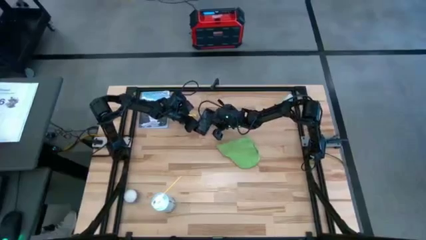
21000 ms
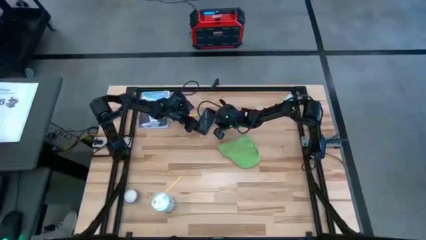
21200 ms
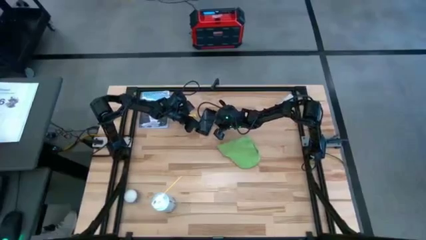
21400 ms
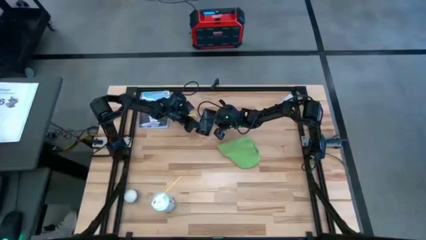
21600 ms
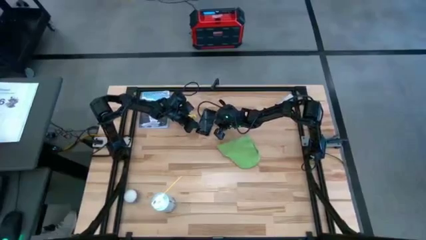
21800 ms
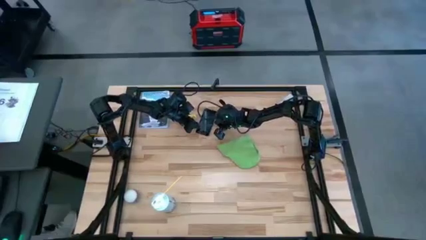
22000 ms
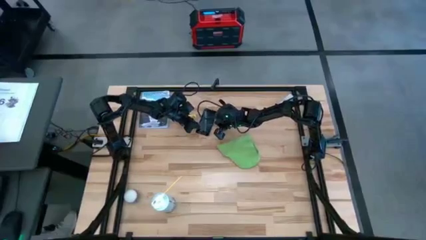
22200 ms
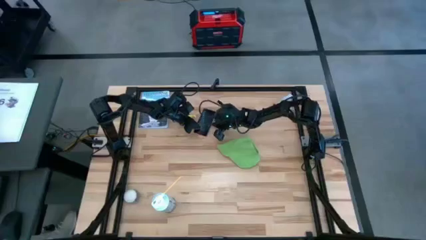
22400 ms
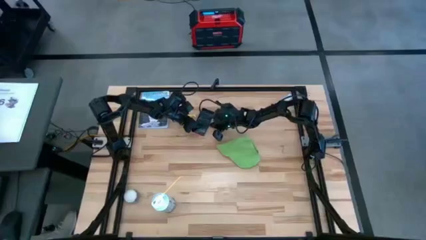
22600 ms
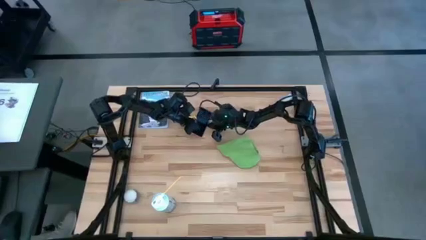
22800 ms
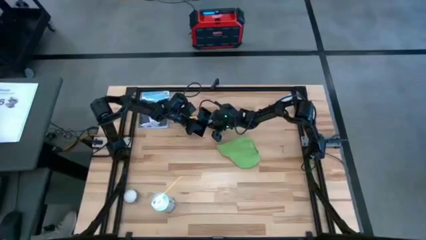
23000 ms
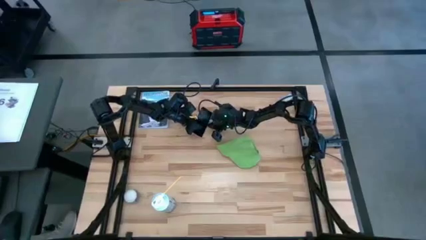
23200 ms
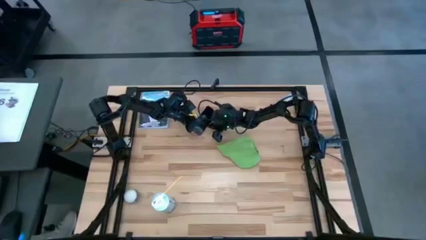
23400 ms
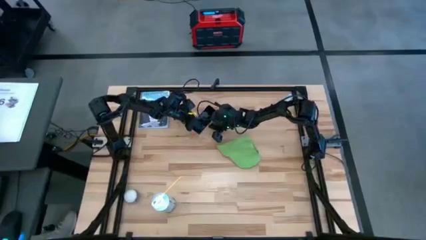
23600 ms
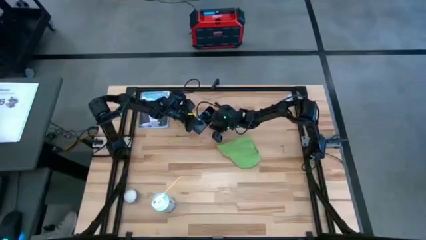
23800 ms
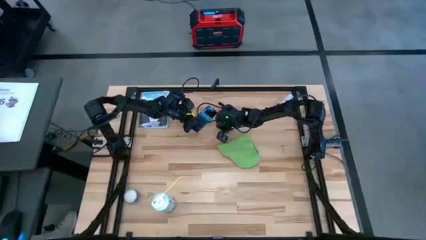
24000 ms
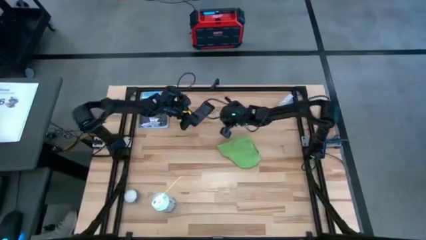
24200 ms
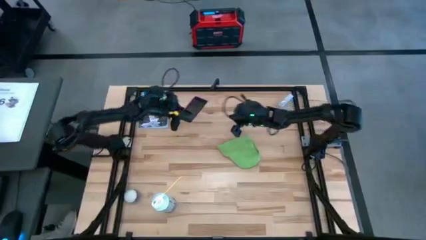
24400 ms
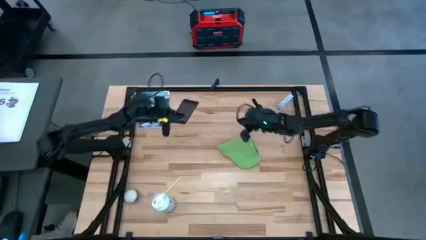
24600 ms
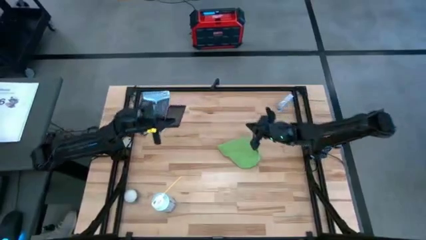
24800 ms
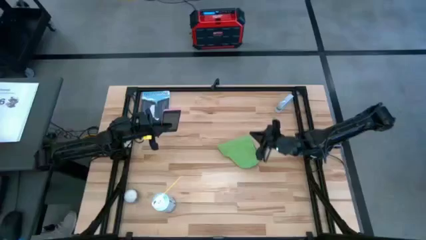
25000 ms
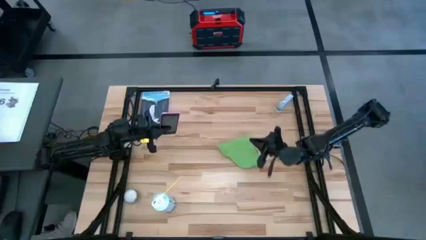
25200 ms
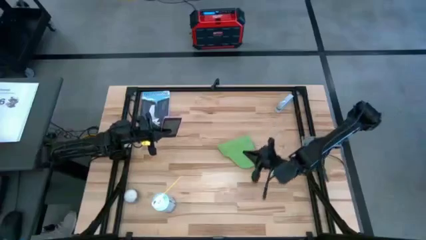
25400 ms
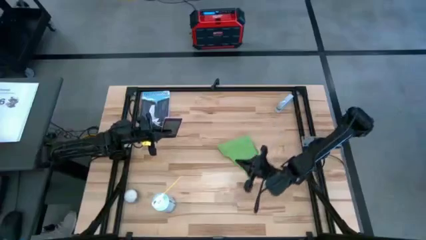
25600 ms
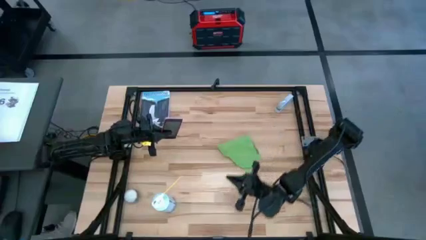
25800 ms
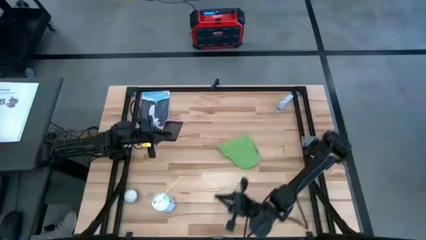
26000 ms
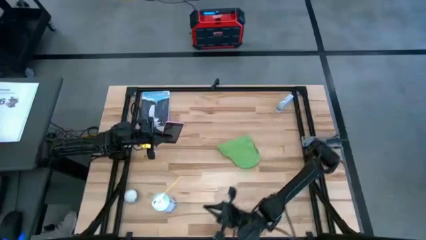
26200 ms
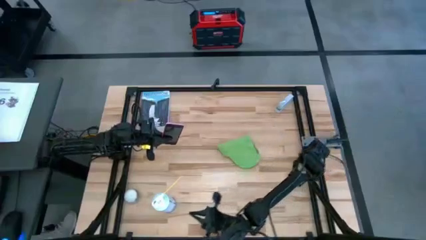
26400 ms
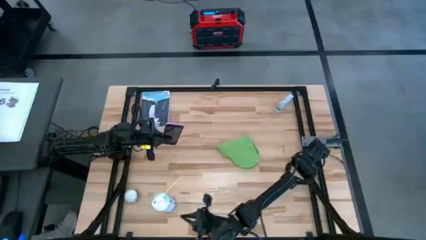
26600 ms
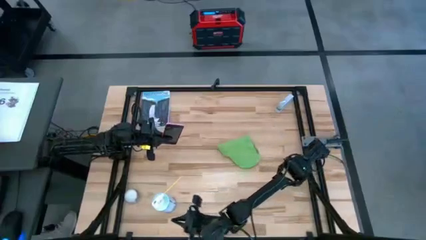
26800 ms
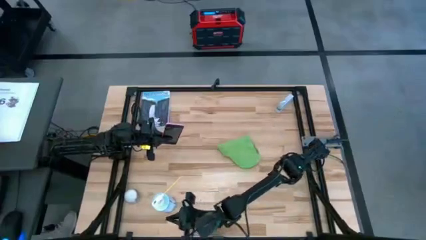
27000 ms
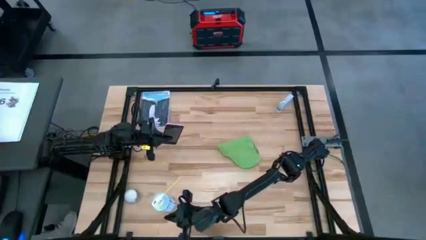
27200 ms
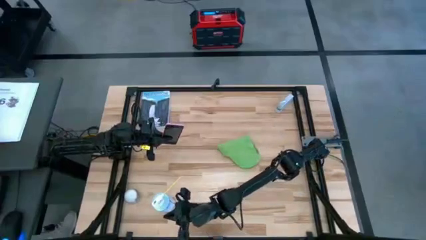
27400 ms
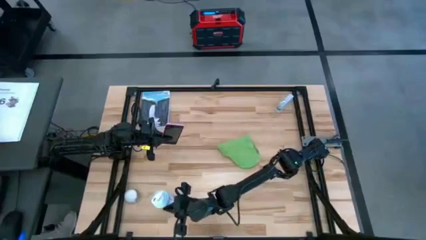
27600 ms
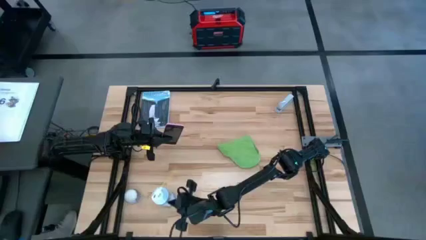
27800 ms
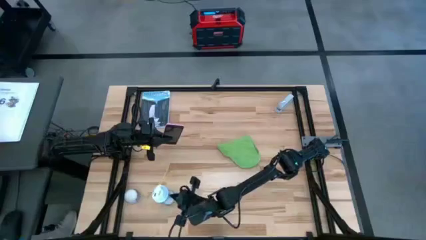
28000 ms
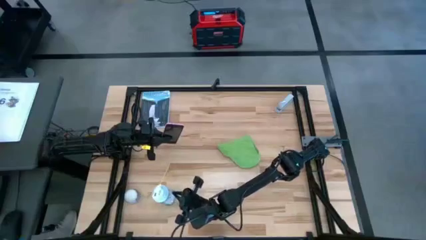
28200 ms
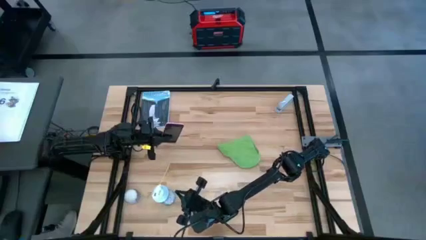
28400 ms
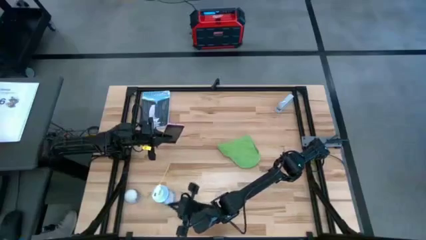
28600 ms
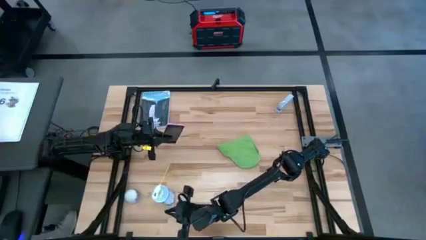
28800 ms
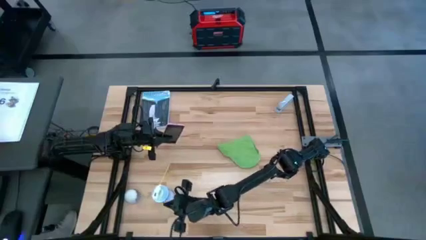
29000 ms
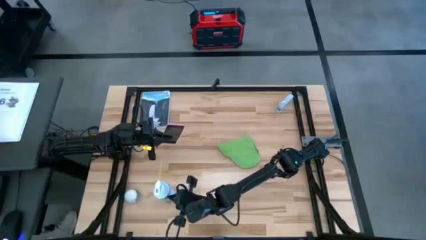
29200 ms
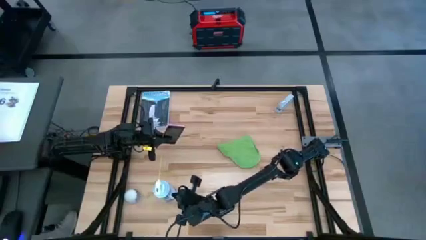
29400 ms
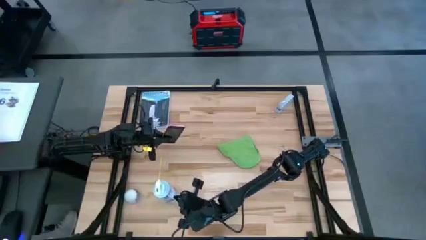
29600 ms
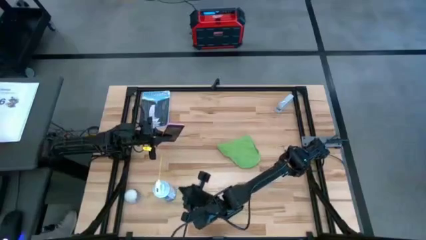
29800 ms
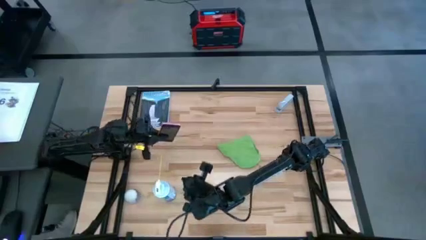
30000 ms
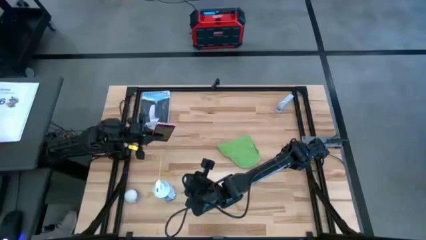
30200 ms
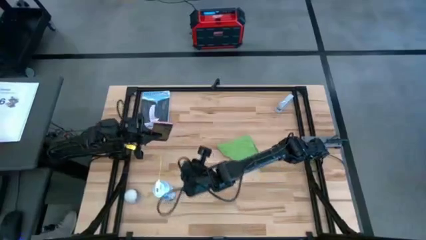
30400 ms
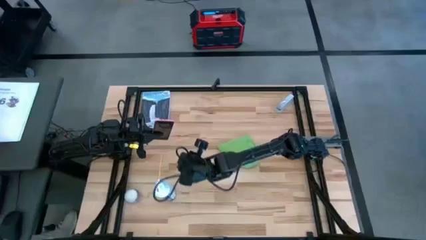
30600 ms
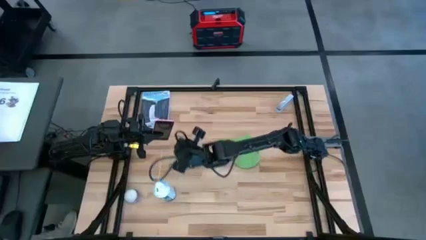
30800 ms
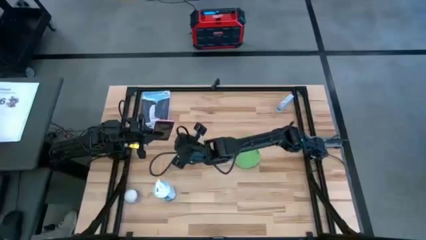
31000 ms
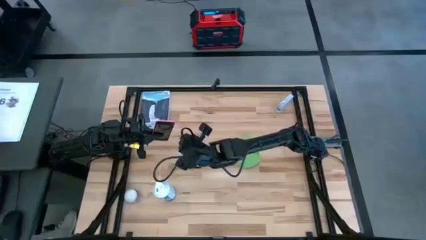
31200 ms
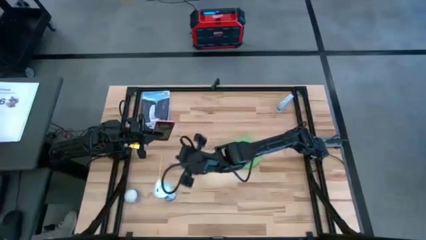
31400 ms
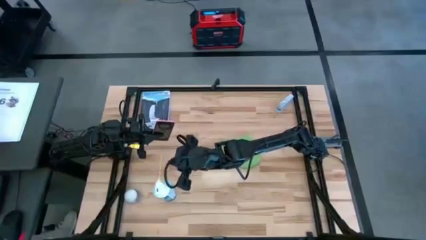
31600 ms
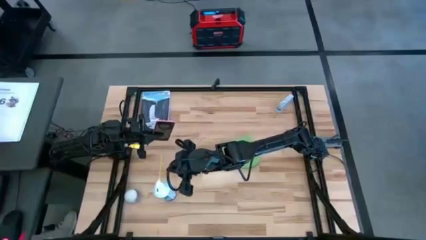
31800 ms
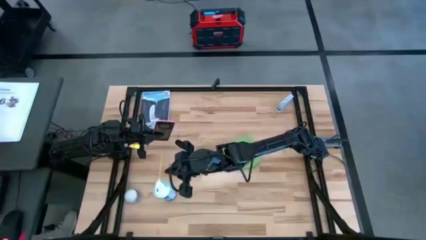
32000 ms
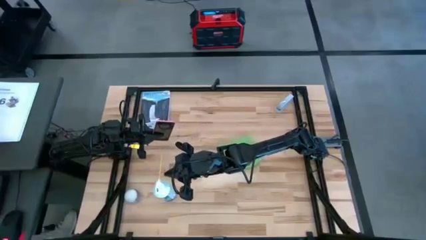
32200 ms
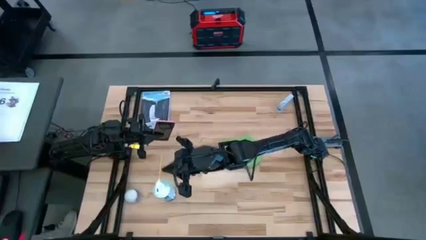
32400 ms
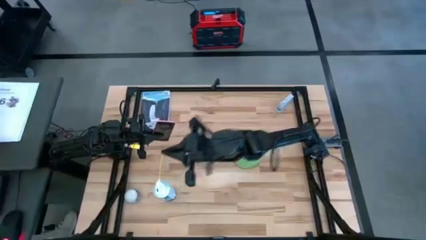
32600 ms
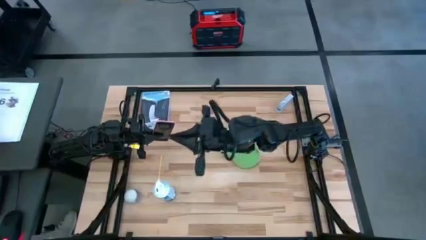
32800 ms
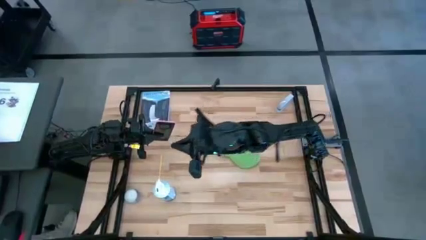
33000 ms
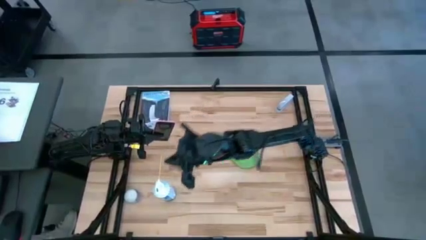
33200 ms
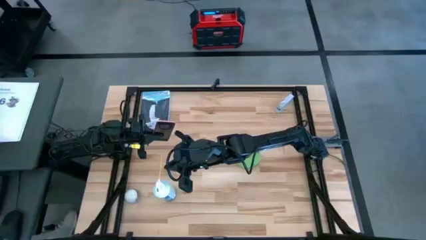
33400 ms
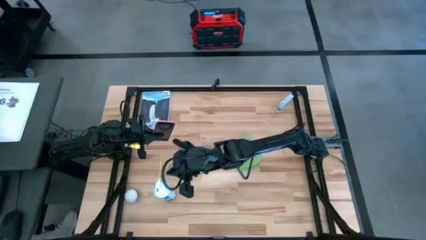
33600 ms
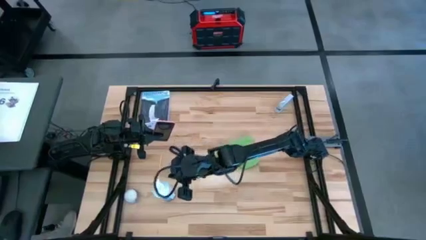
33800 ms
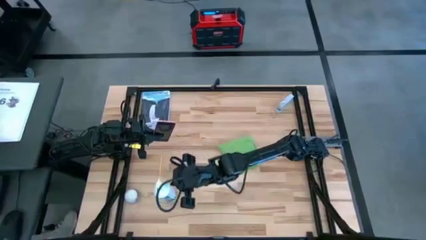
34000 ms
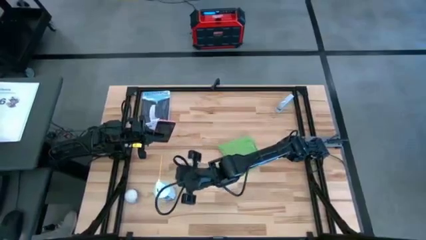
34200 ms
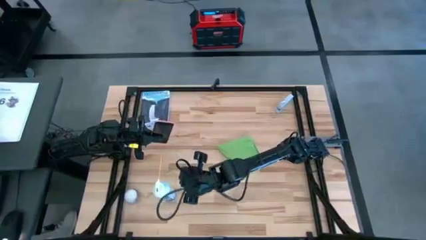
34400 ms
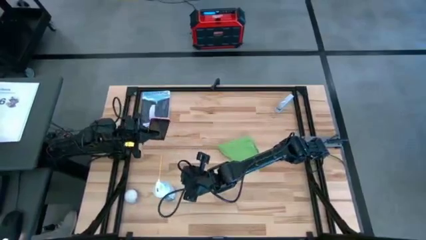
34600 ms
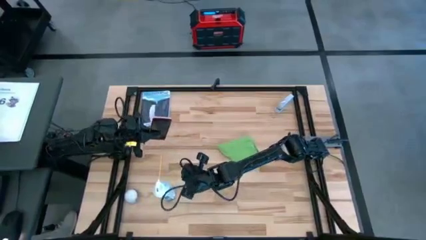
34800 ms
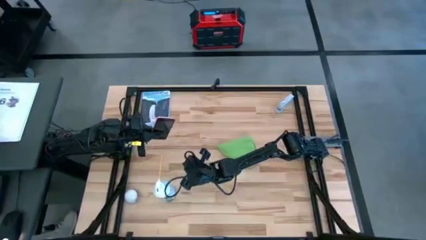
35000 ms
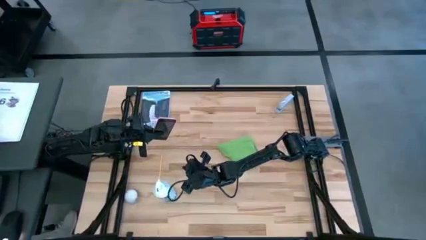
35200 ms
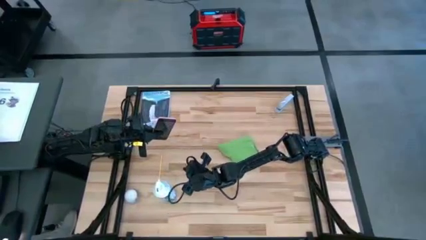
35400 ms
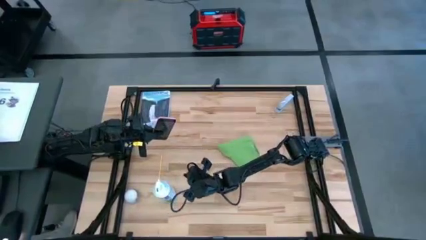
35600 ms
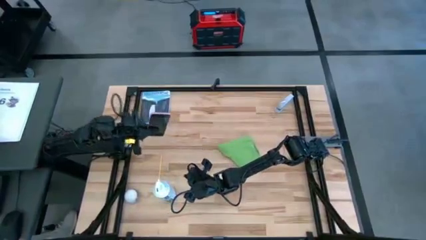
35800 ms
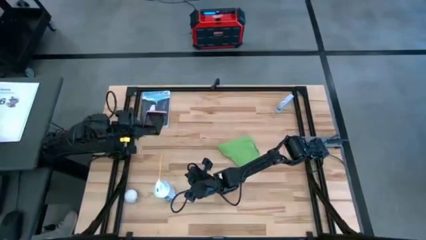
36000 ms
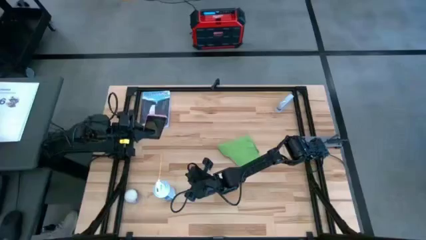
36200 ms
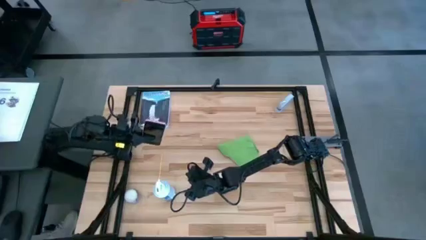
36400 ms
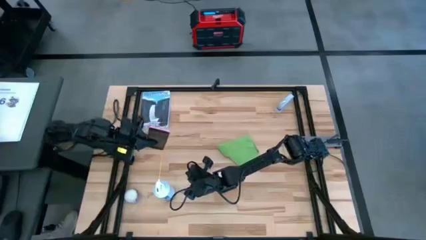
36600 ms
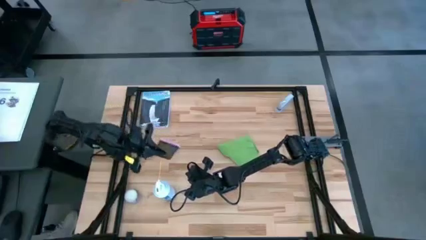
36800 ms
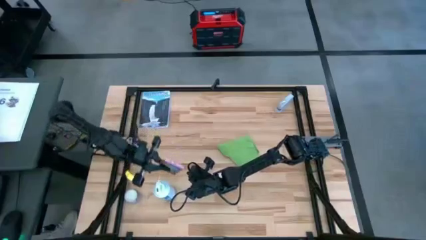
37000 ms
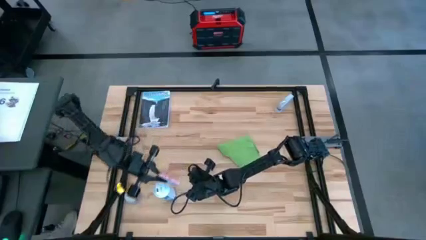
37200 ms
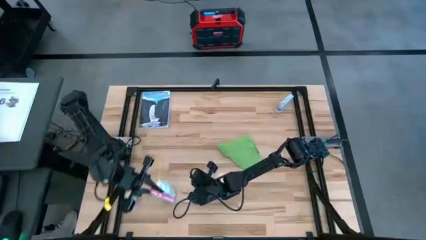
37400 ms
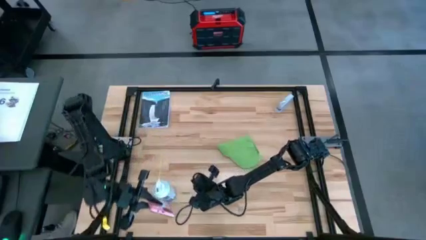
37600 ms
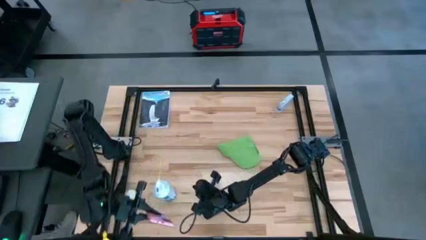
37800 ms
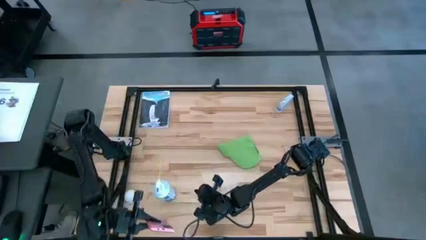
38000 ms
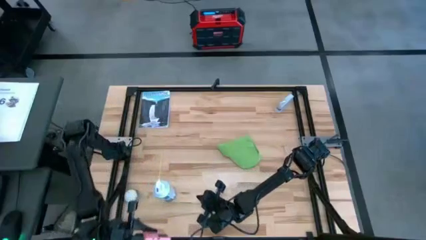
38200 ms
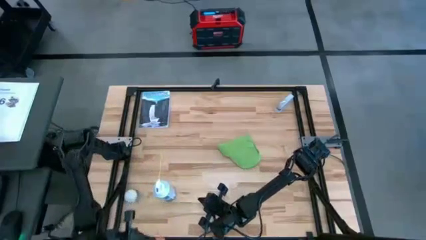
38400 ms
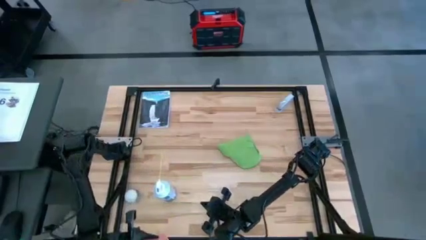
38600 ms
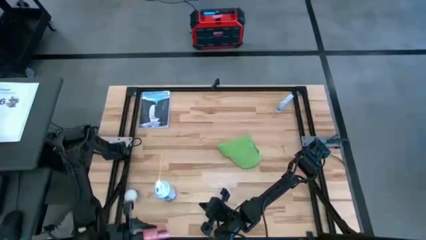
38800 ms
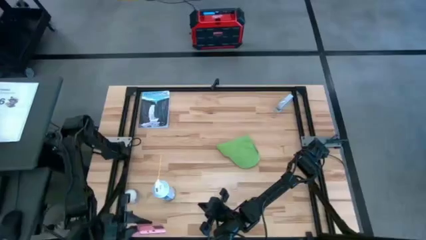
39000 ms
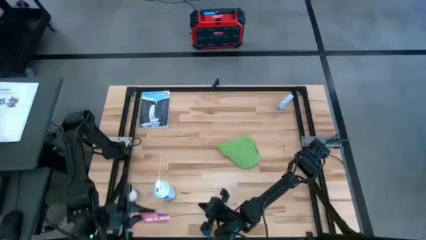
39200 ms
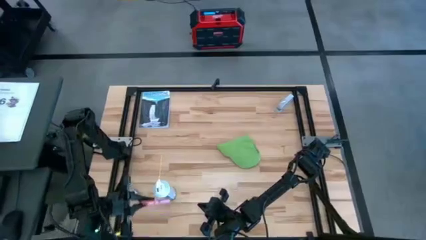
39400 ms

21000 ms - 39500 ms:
Task: Apply microfiber cloth
Spray the front of the black cellphone with the white spray bottle
